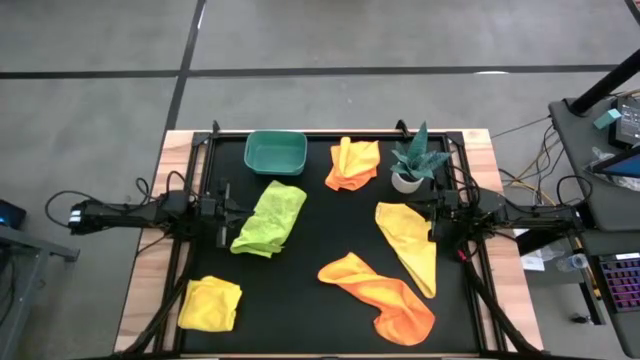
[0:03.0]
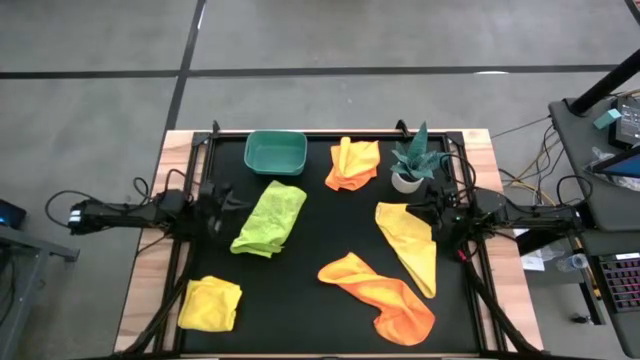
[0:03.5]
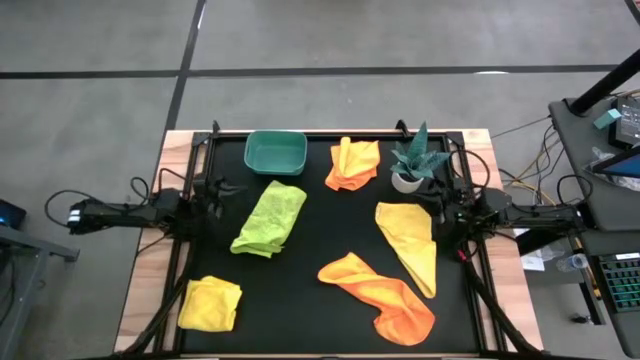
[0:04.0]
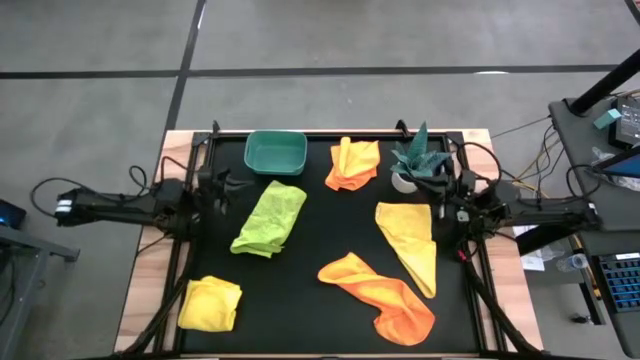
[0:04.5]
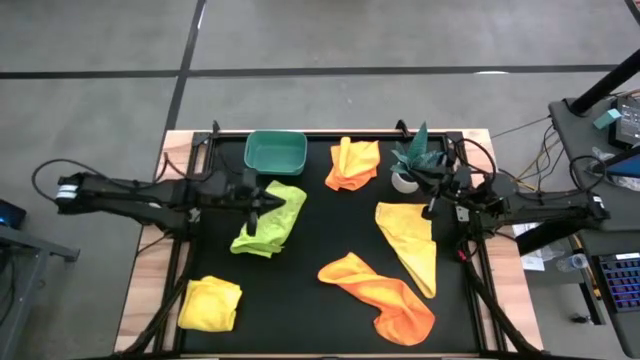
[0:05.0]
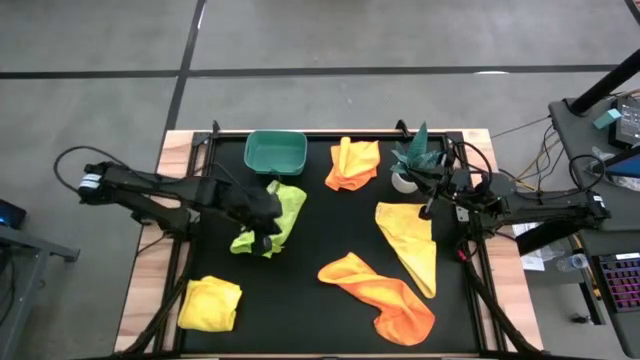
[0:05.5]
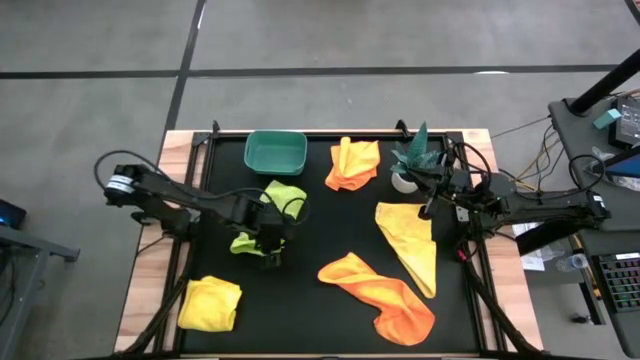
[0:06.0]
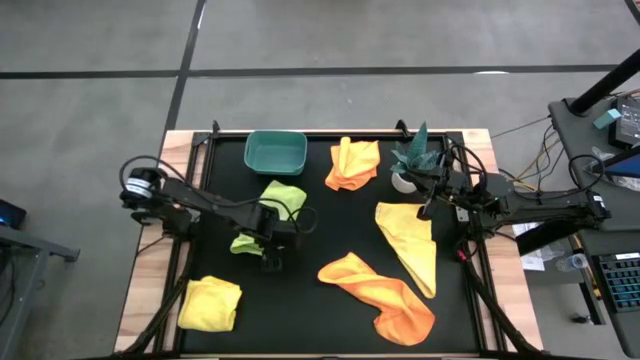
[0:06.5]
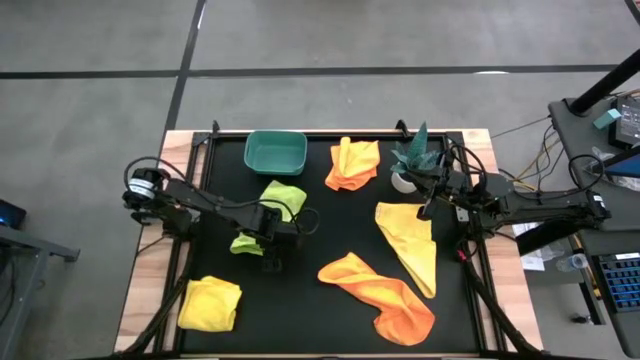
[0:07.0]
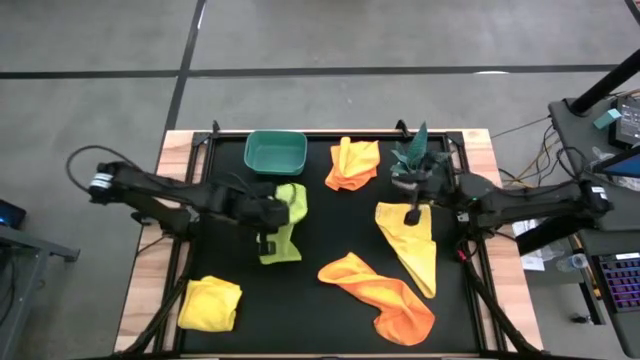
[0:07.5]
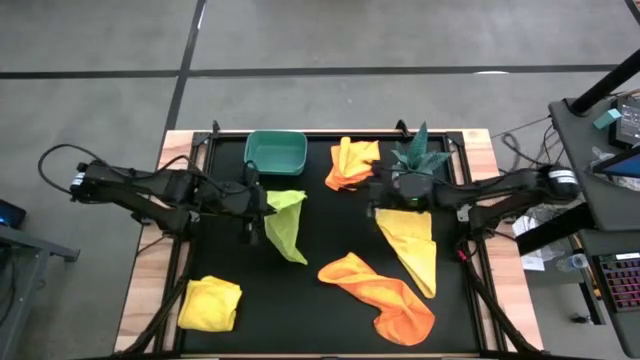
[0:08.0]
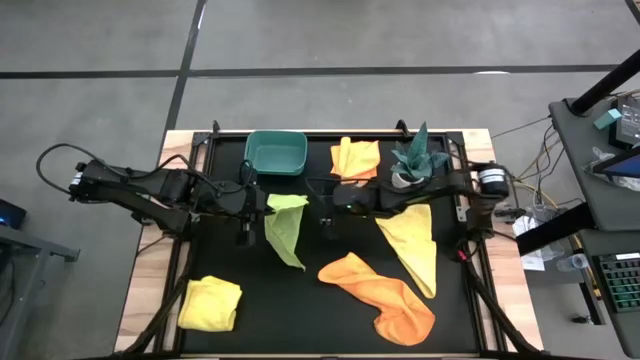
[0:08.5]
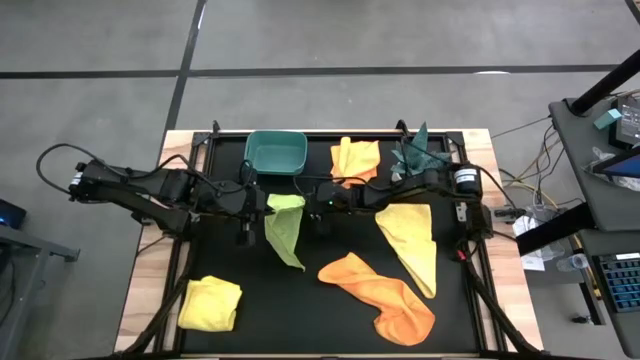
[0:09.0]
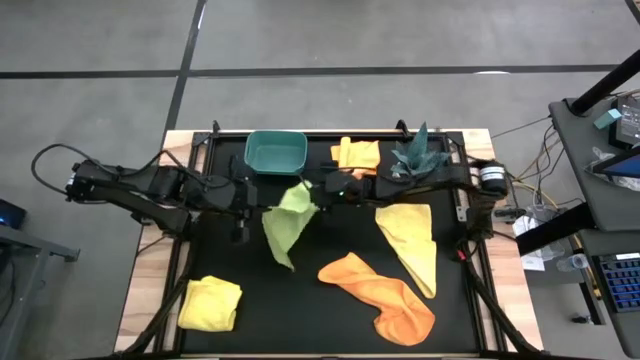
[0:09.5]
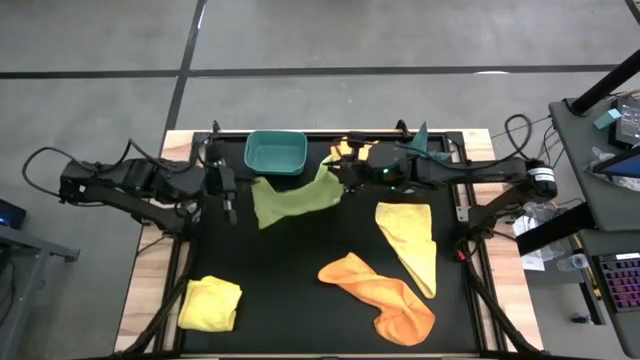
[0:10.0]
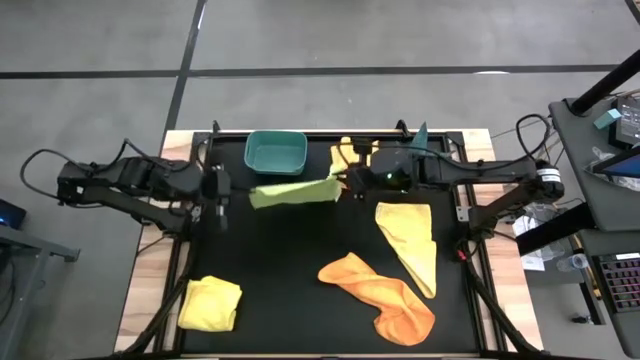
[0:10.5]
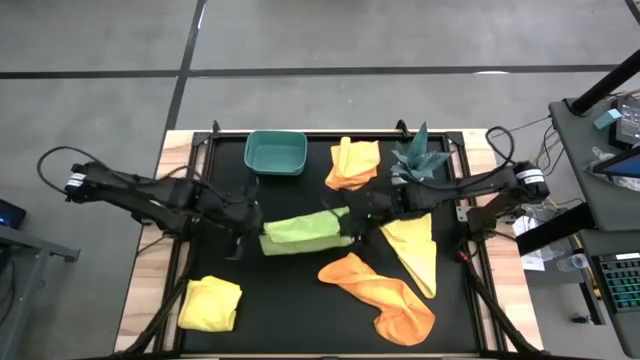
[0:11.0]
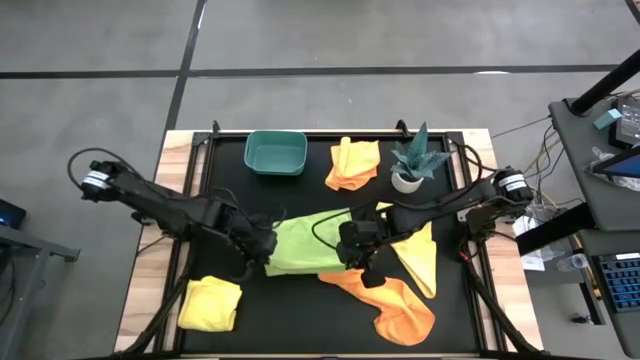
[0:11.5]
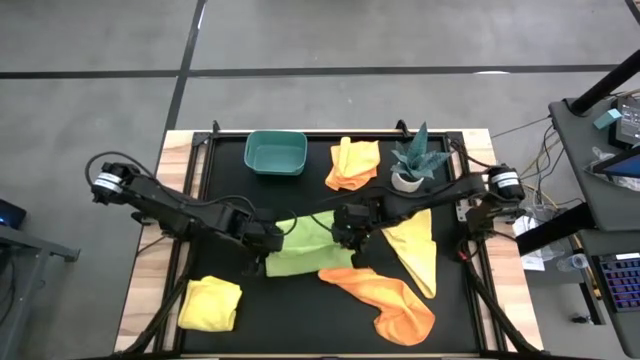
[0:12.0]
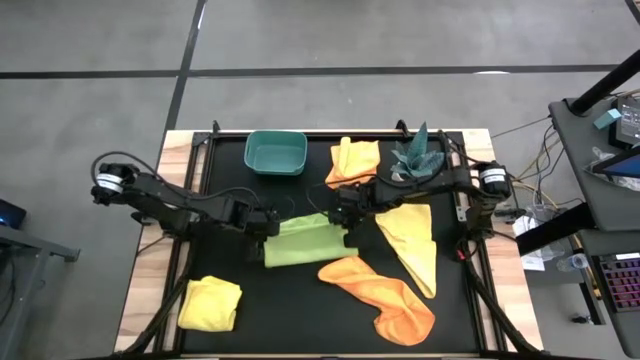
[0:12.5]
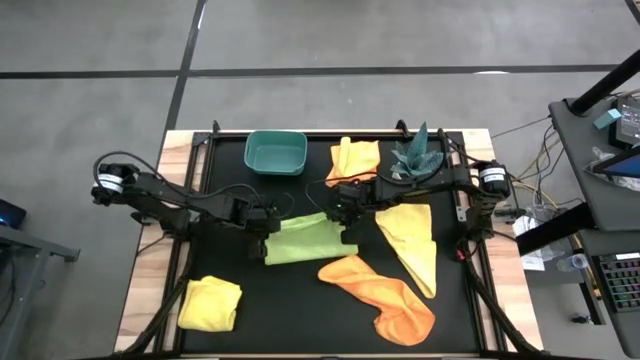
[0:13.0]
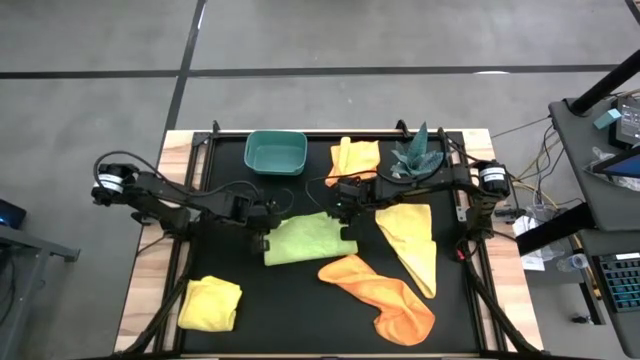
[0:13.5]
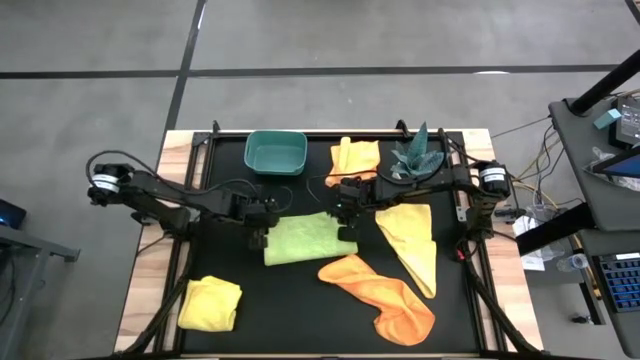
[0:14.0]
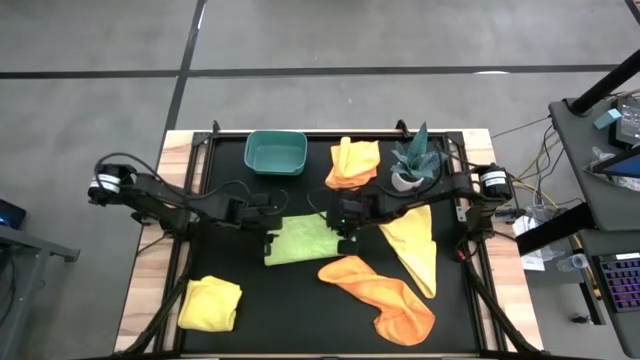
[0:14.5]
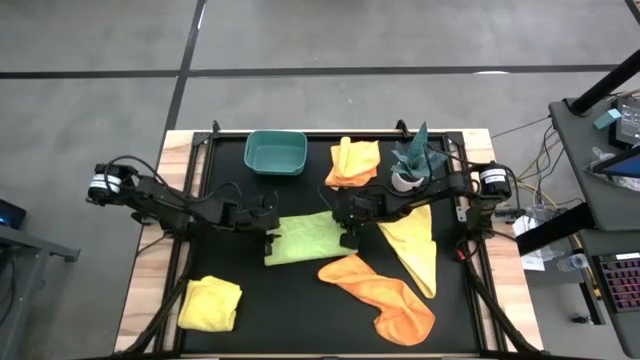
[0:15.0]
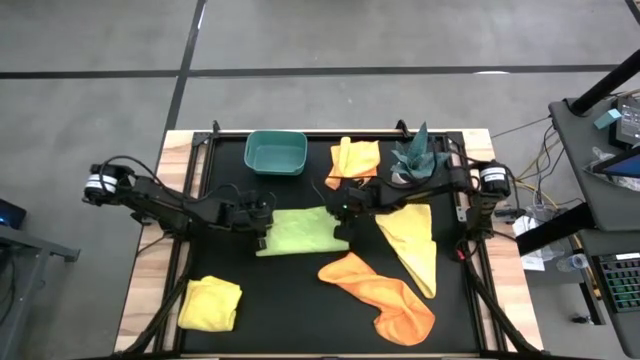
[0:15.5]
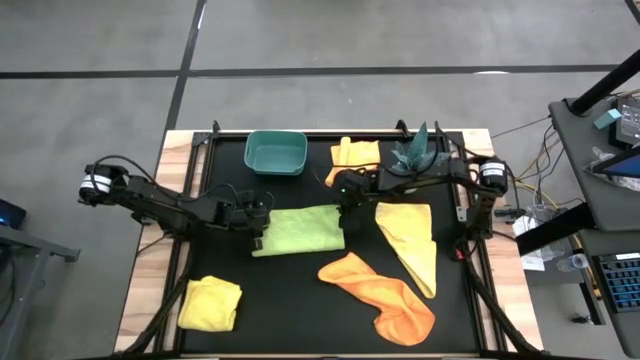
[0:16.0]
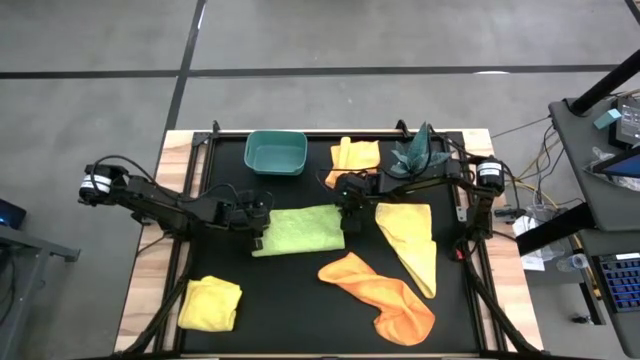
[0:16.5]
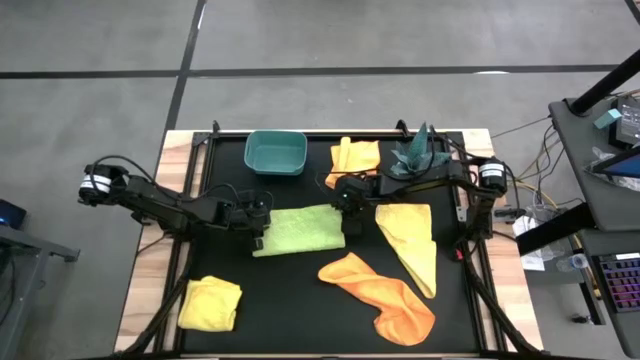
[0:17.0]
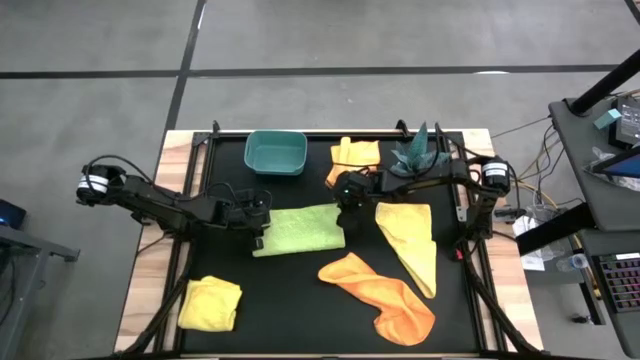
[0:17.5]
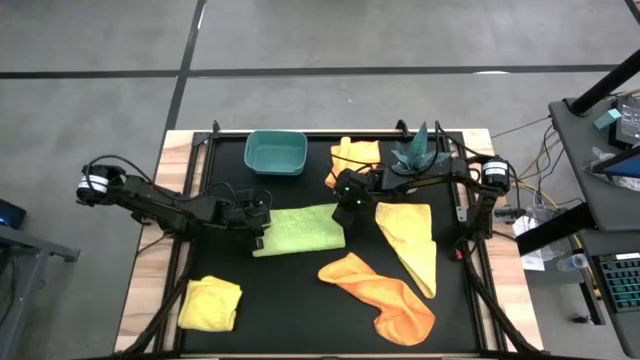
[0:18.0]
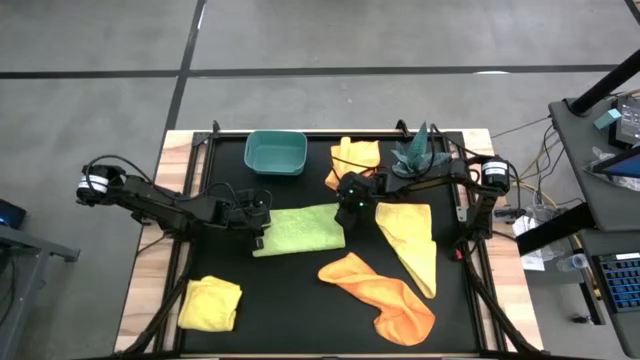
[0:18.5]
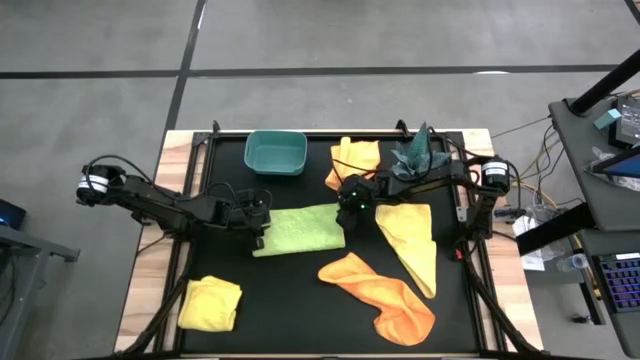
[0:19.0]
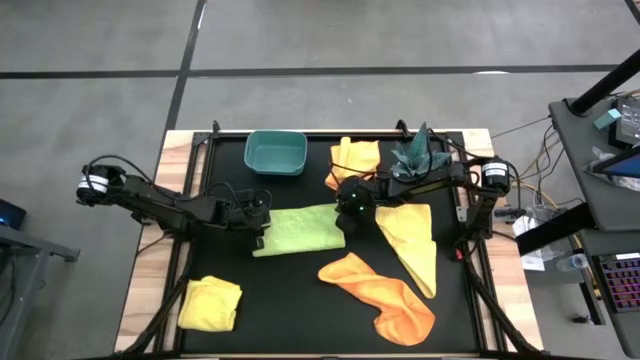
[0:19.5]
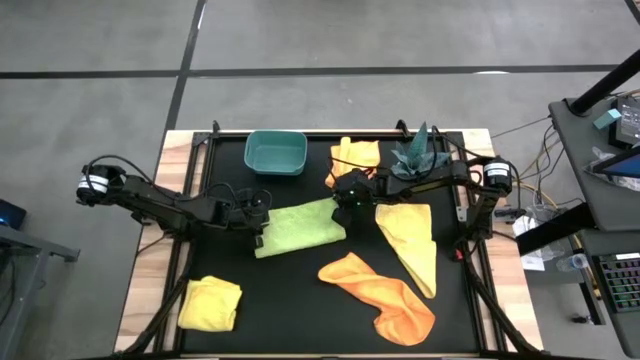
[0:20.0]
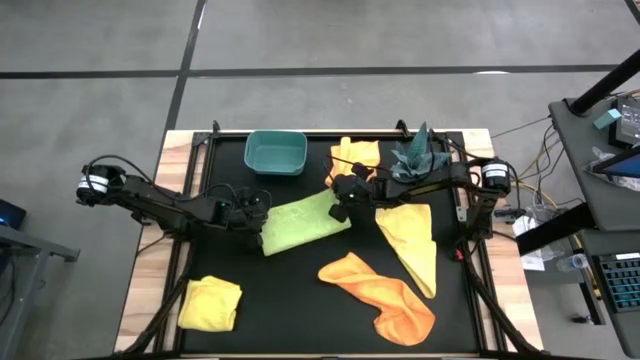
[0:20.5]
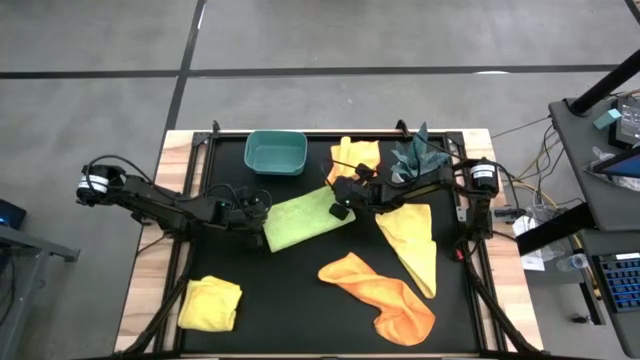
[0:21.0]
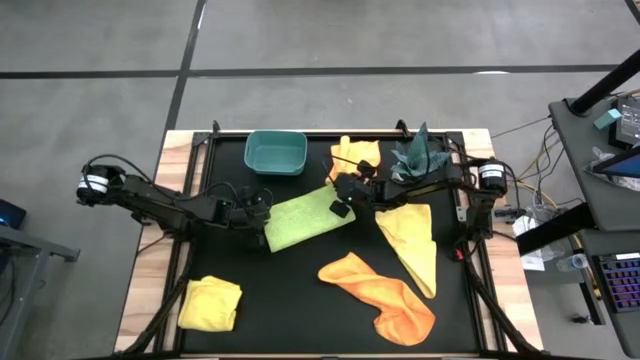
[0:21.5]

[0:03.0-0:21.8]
Task: Fold microfiber towels
Fold the green microfiber cloth
